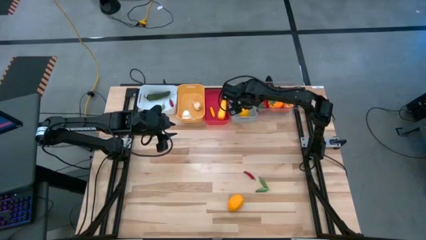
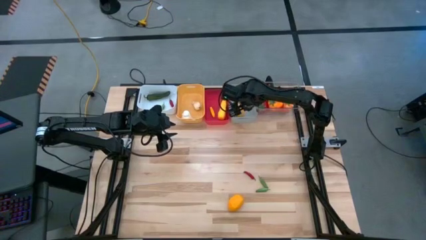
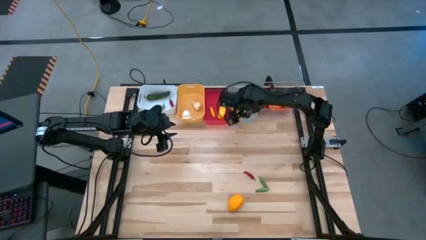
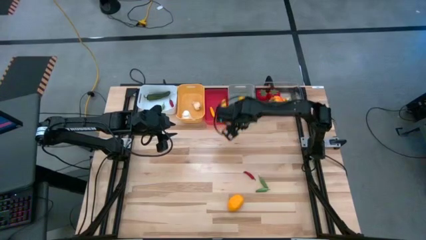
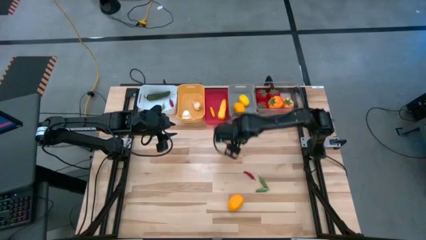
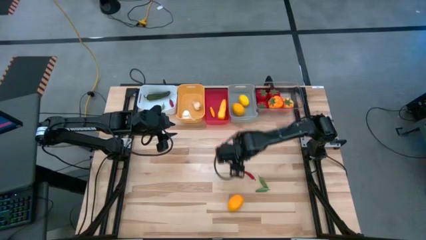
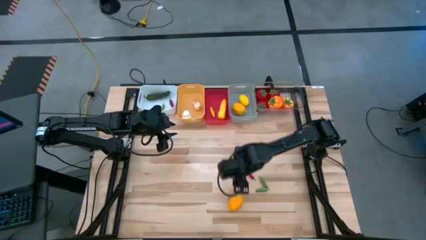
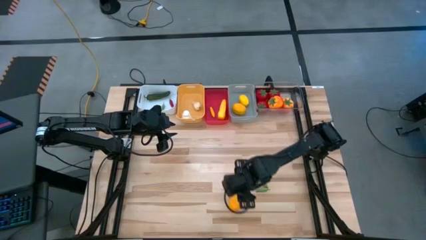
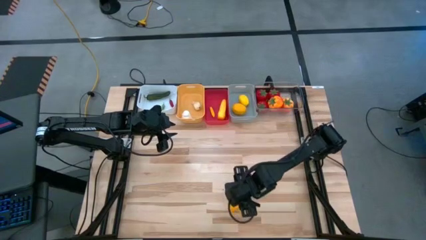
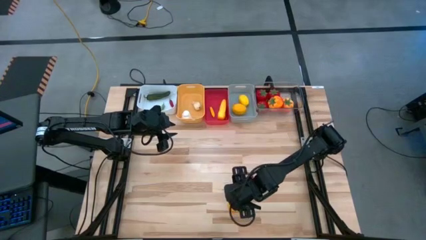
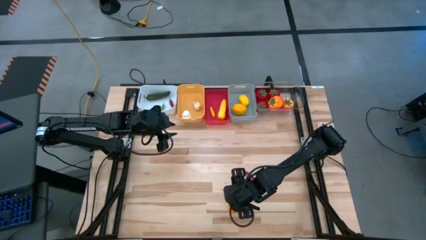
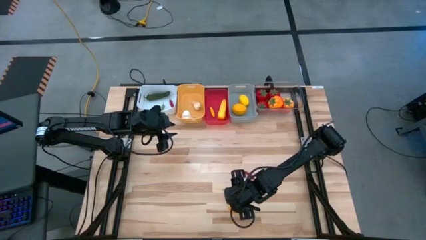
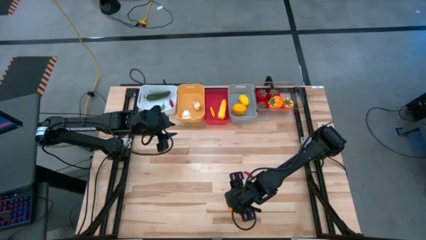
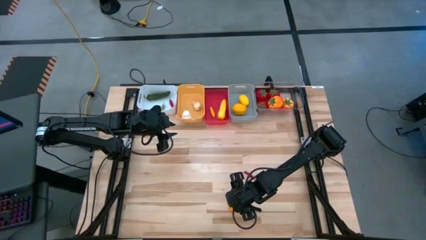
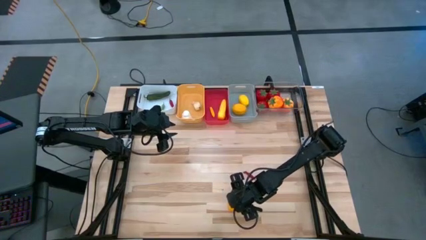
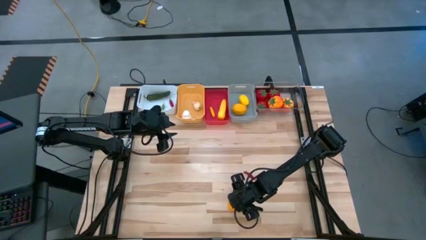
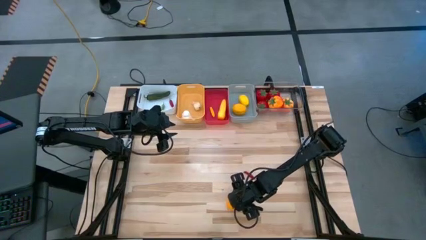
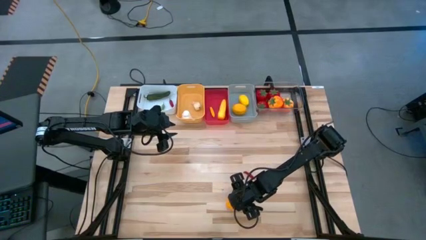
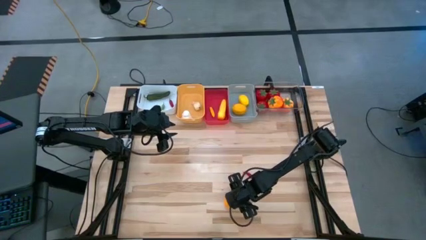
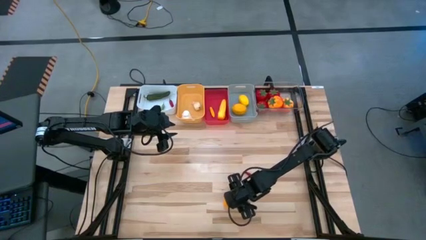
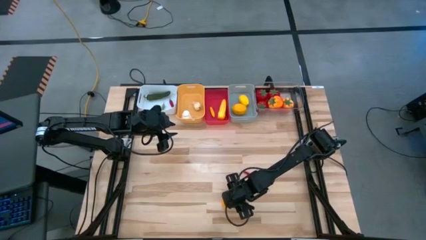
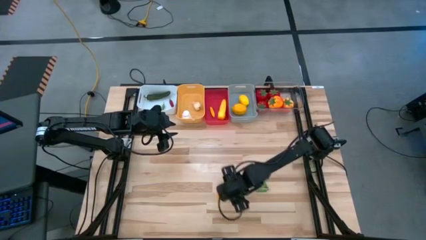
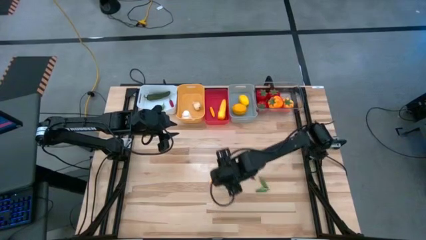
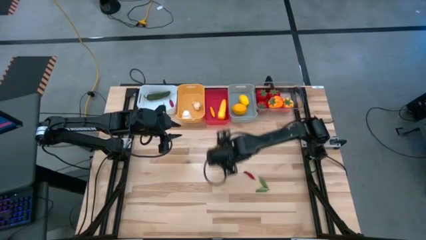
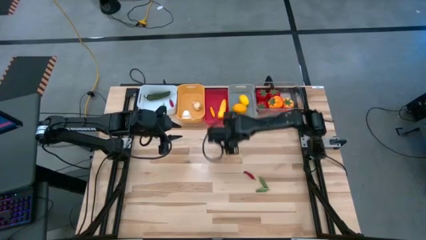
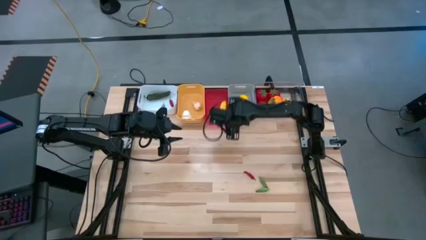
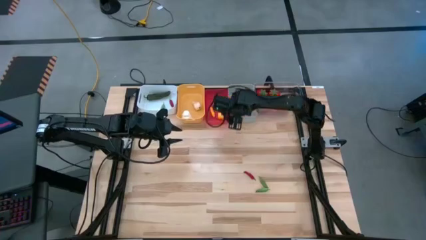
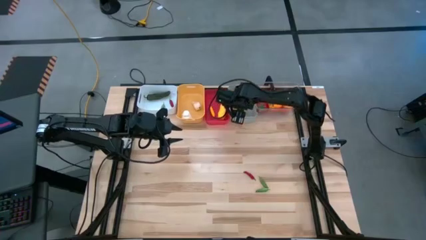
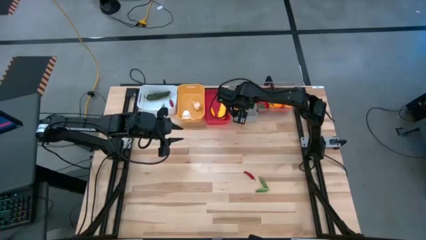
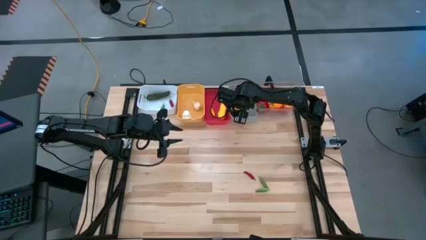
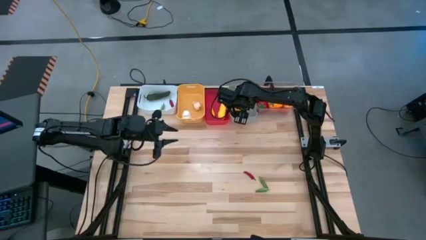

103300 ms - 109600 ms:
Task: Sort produce into baskets
Put the yellow lemon into the gray bin

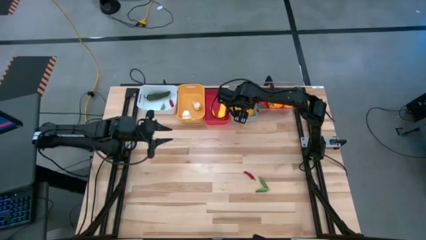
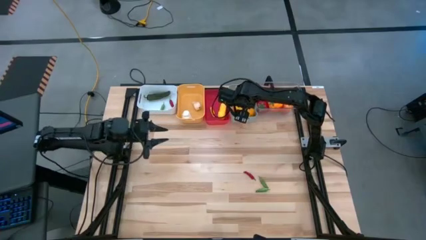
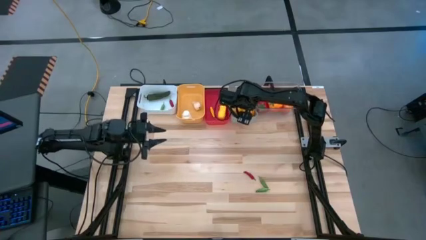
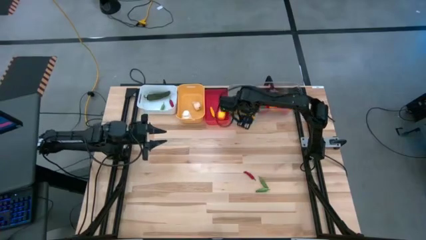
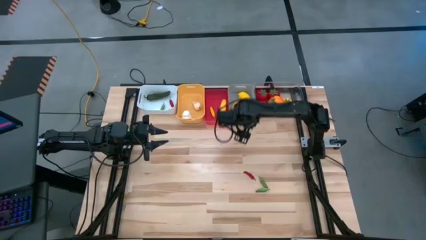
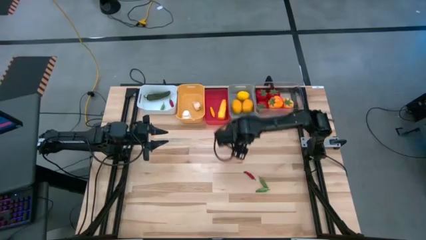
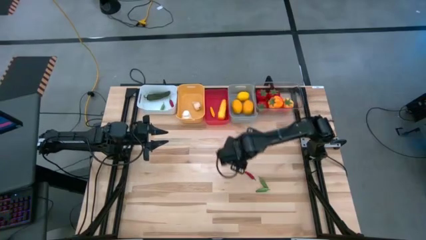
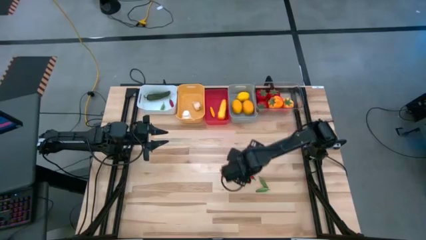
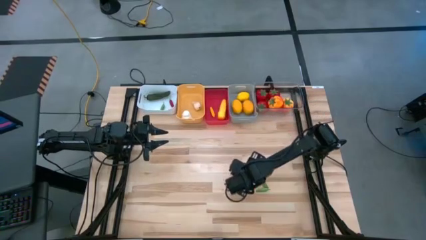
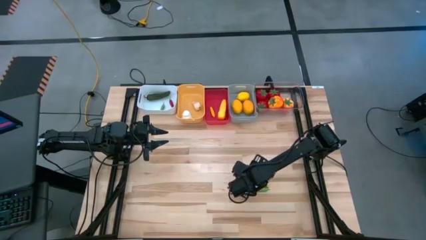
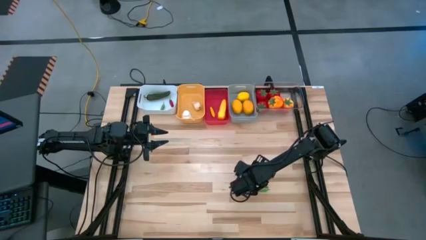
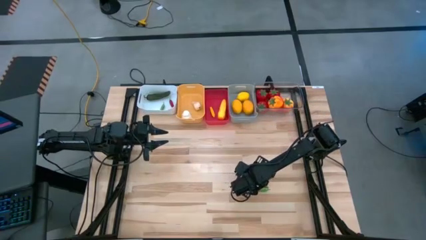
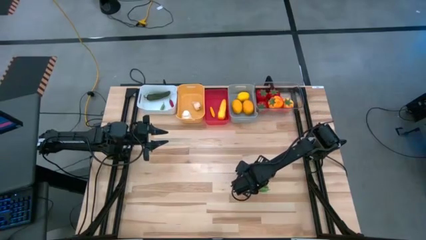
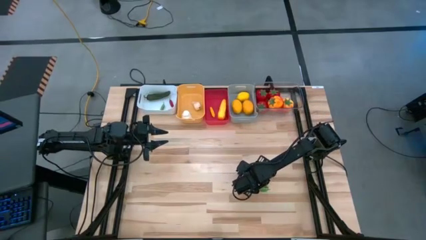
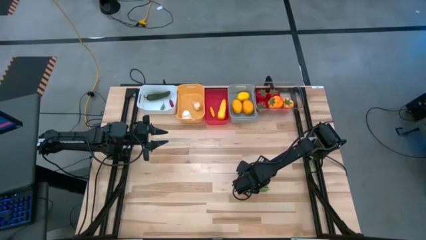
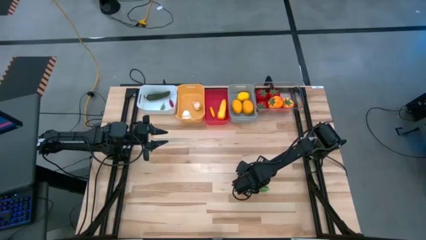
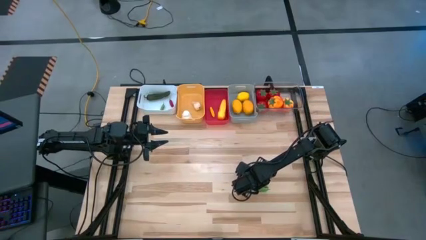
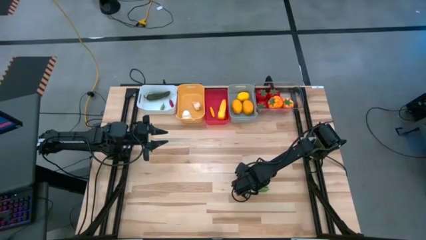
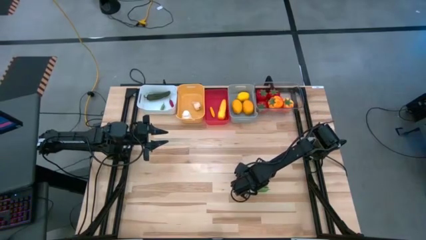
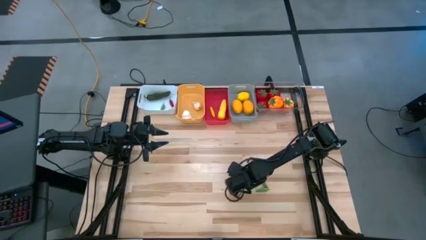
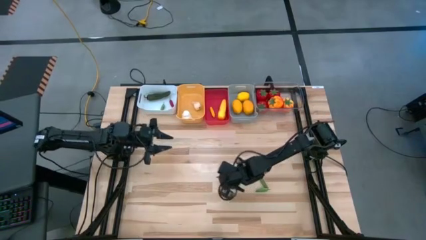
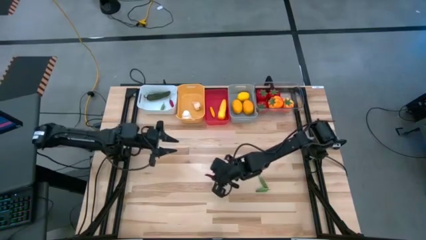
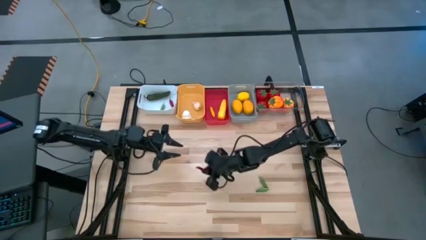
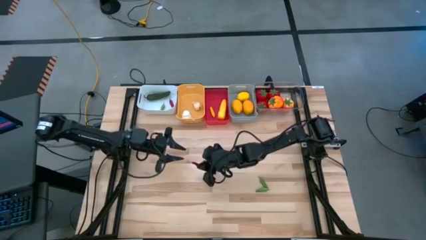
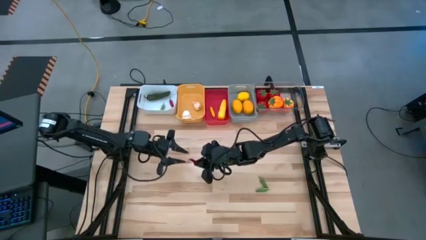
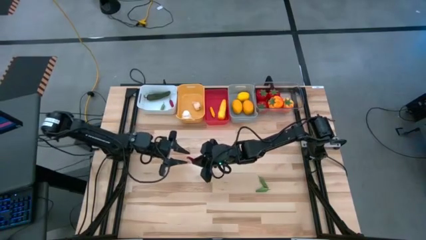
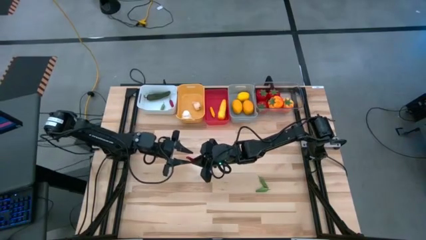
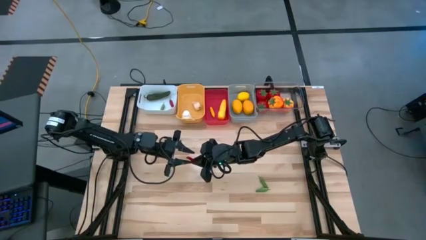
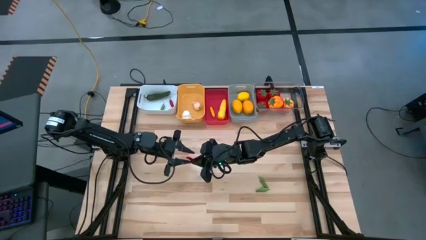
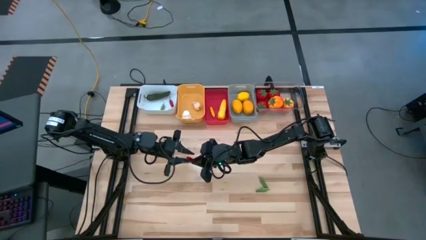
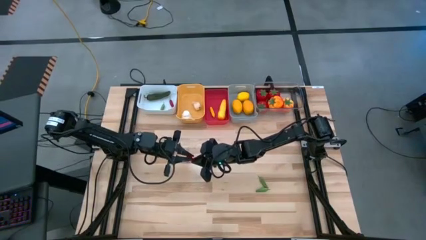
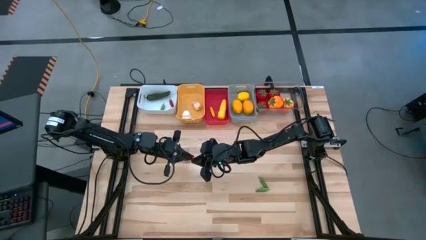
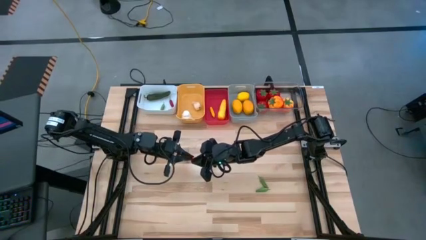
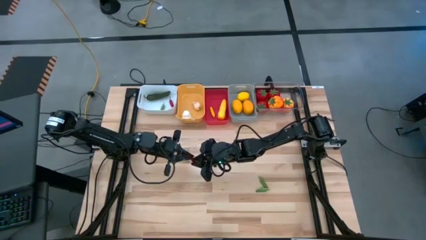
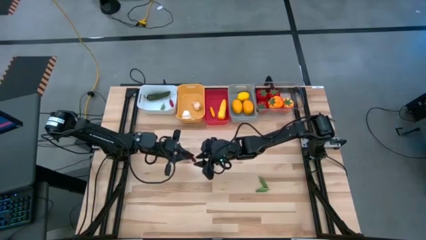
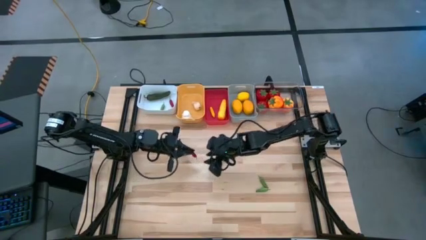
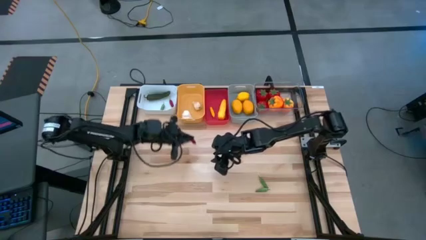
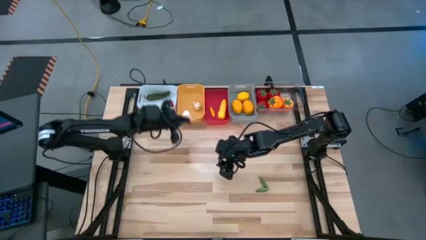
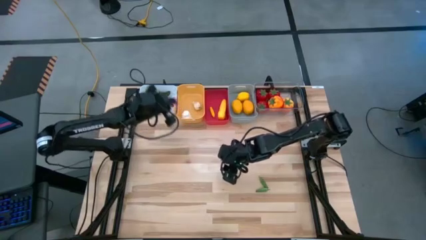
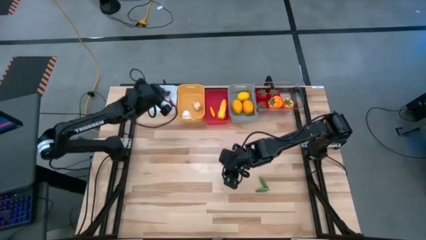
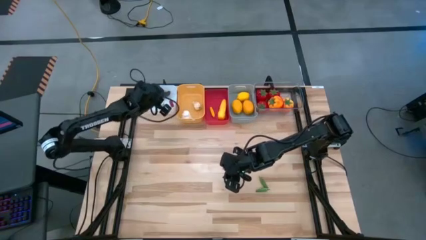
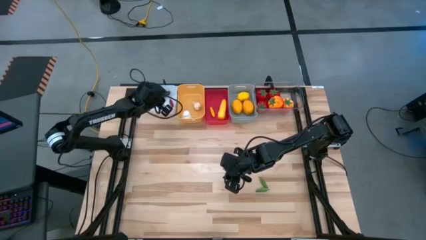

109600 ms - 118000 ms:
Put the red chili pepper into the white bin

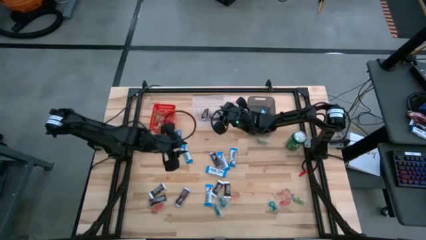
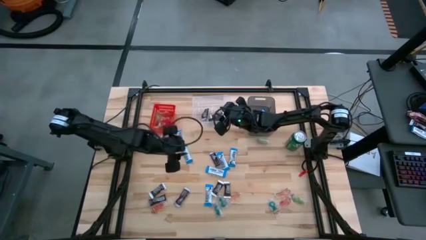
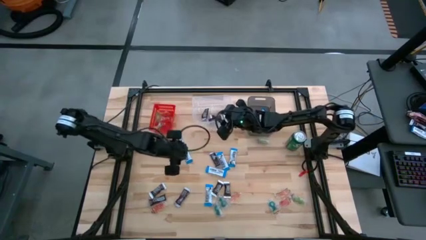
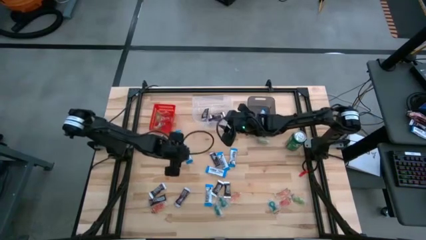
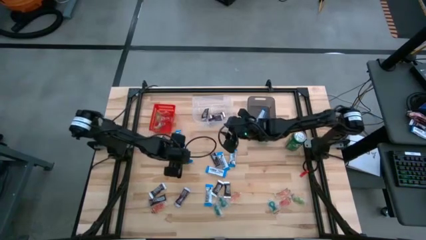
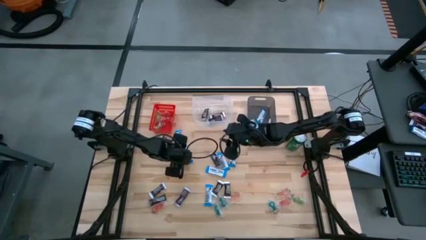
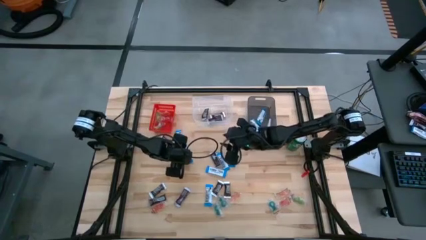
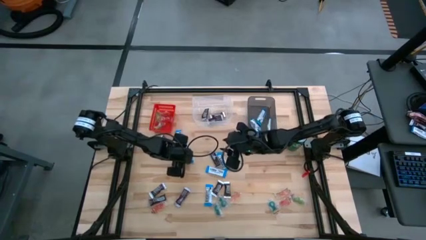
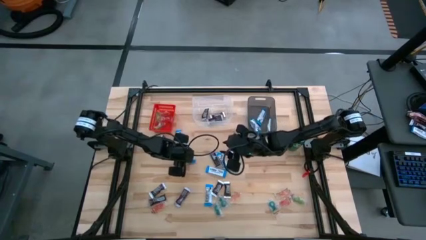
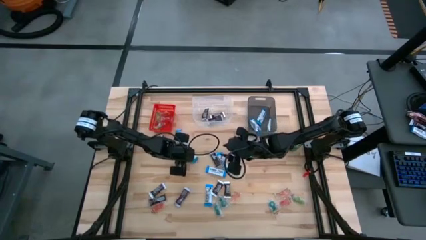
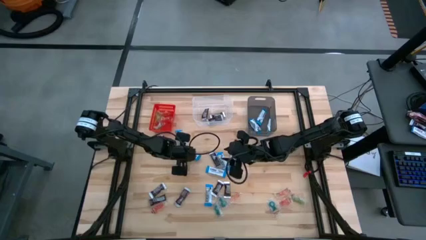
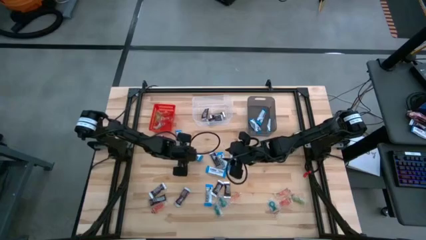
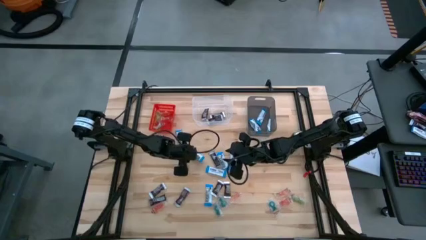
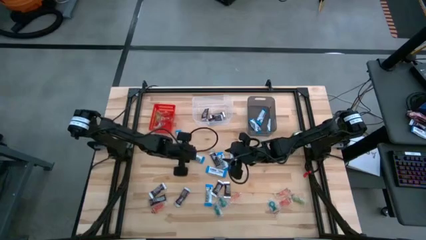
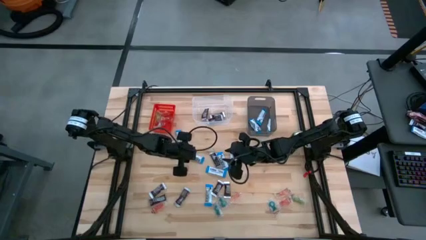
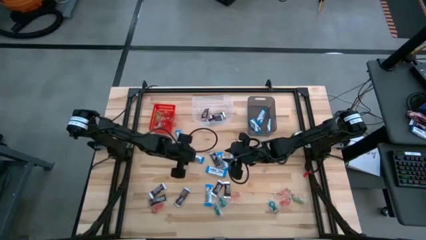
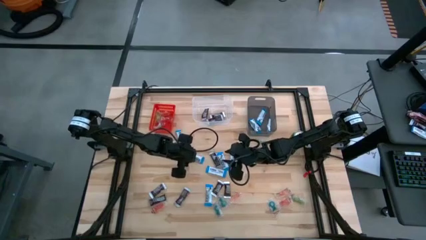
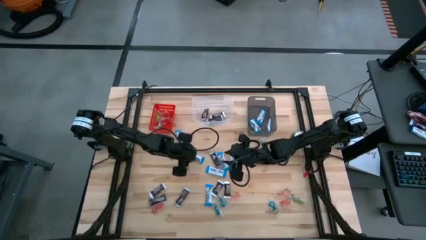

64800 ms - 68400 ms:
Task: Sort candy
Put the white chocolate bar into the black bin
